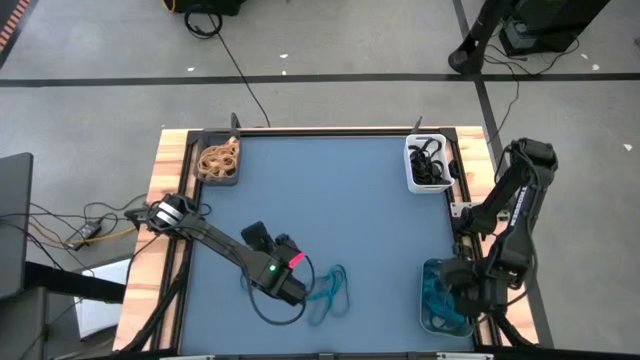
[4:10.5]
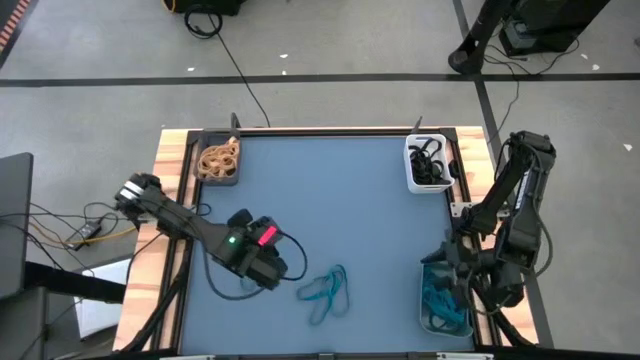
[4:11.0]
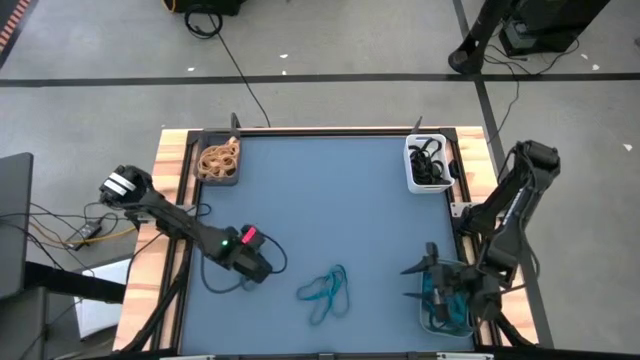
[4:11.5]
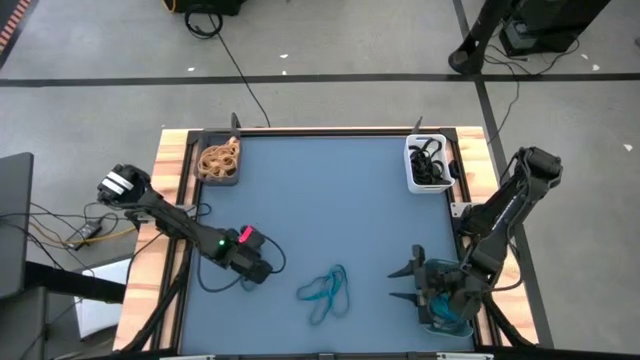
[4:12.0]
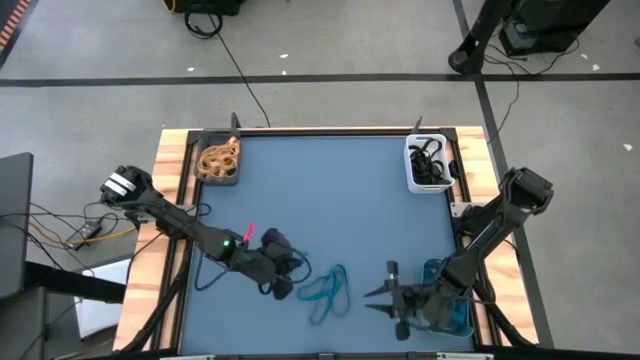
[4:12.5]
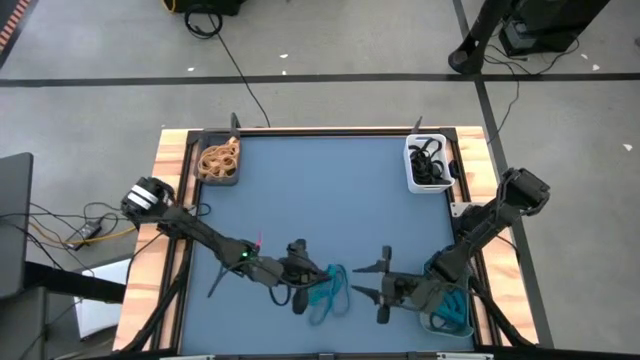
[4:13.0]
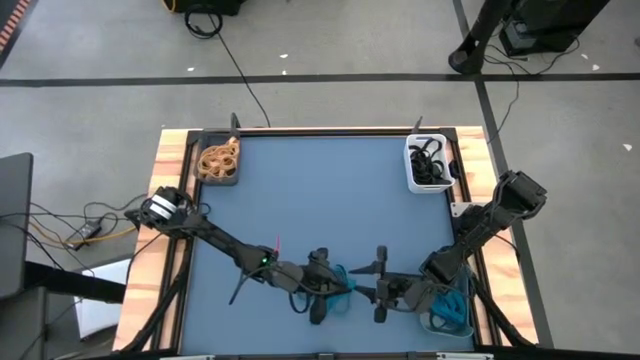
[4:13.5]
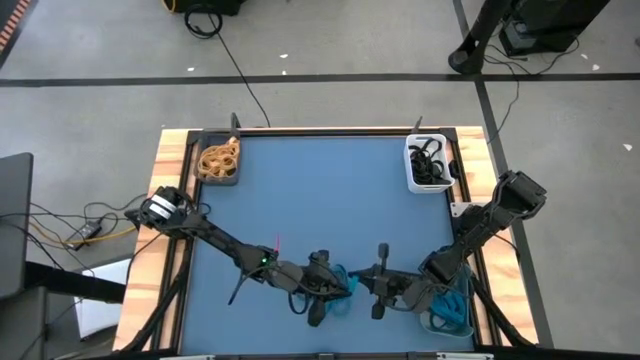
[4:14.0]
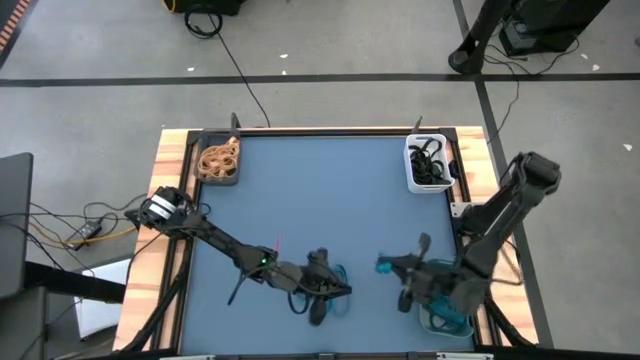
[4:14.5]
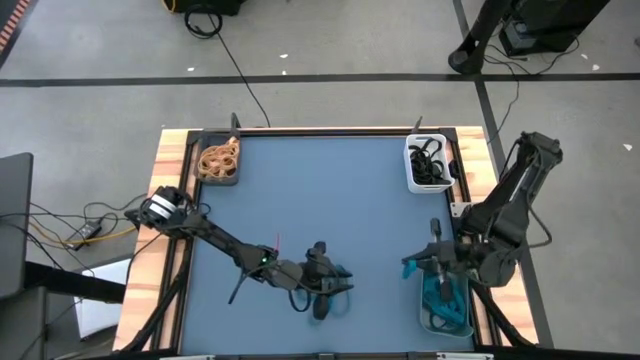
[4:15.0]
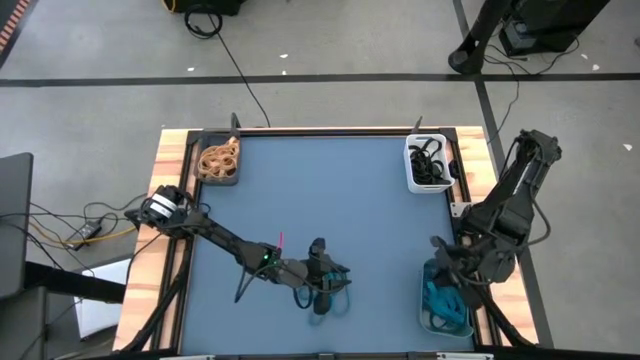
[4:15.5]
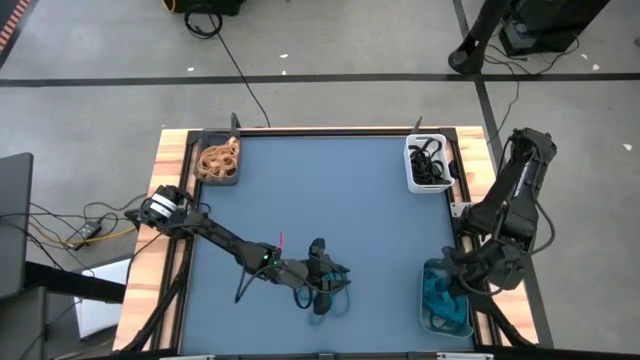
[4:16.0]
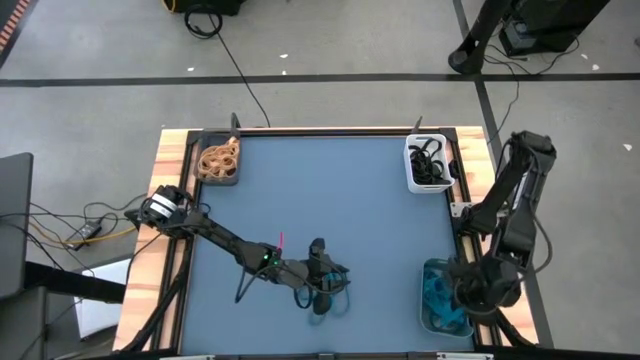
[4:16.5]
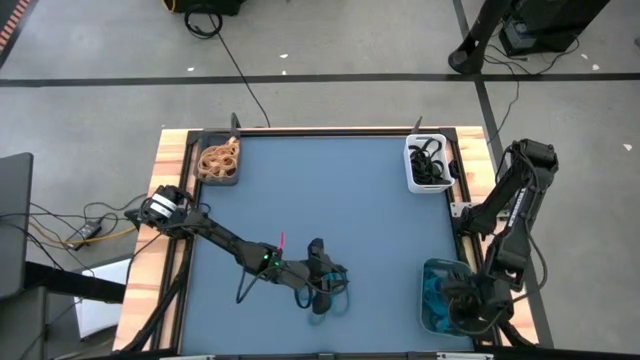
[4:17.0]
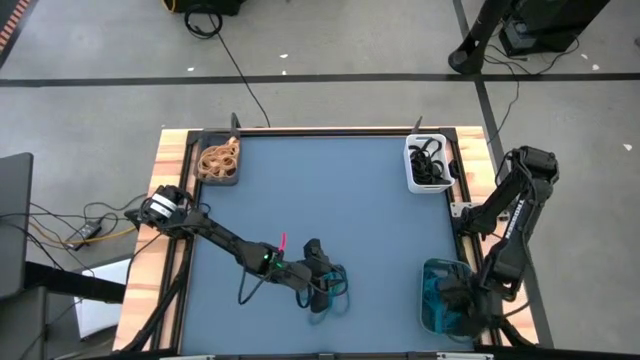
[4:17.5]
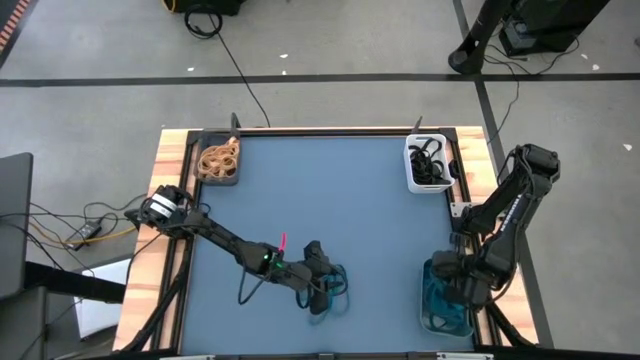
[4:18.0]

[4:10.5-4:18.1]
Task: Sort rubber bands into baskets
Put the blue rubber band into the blue bin

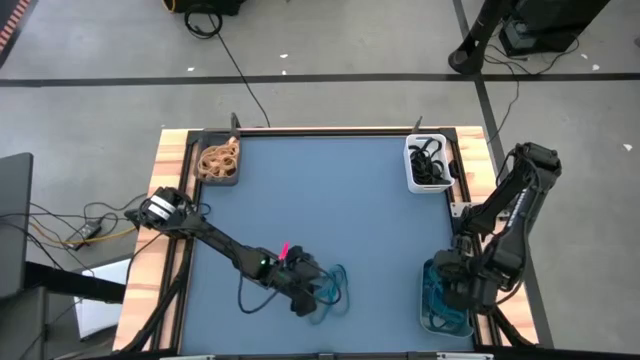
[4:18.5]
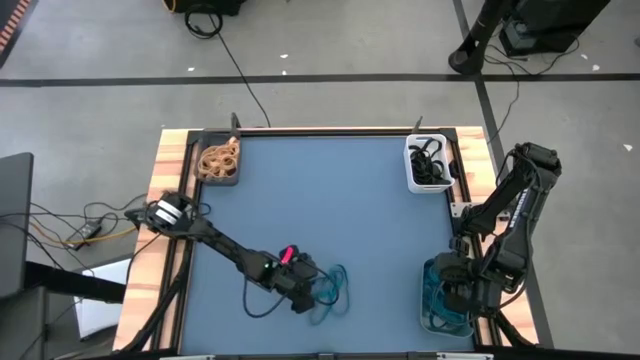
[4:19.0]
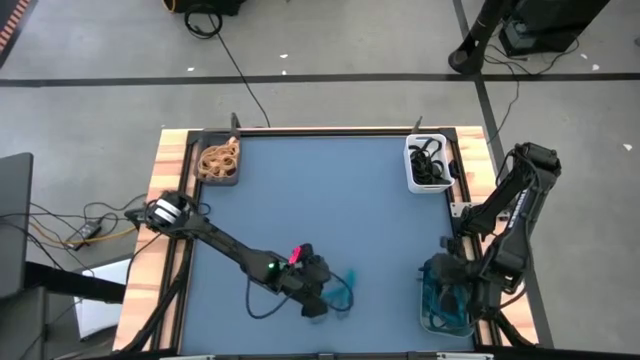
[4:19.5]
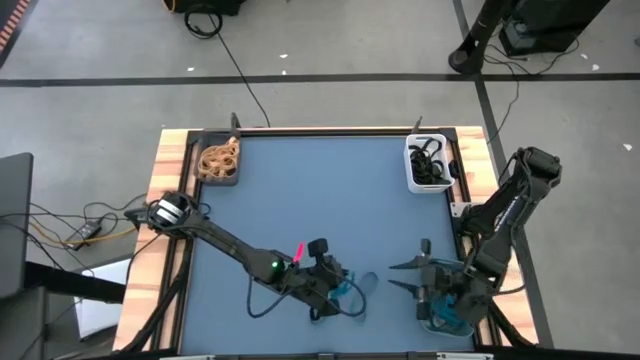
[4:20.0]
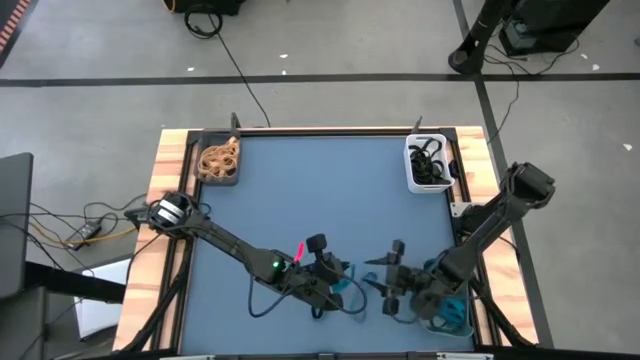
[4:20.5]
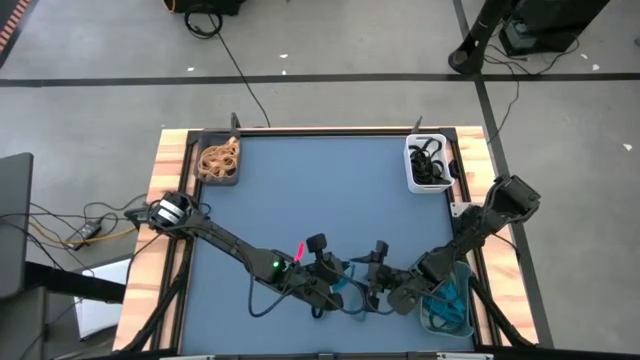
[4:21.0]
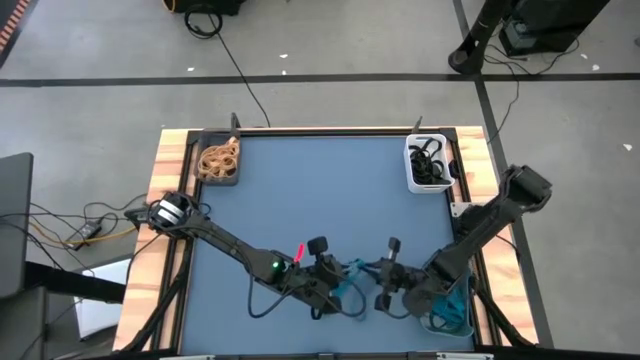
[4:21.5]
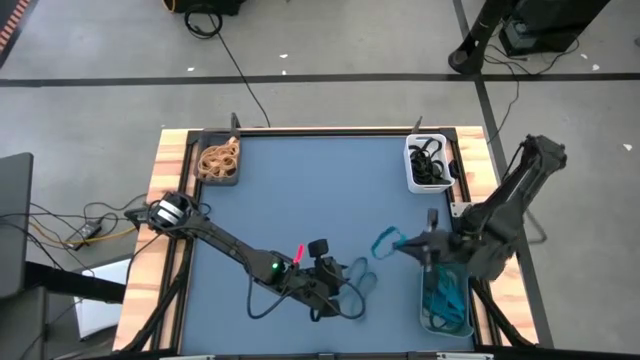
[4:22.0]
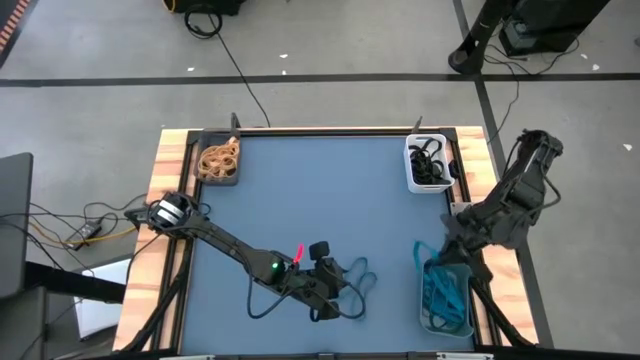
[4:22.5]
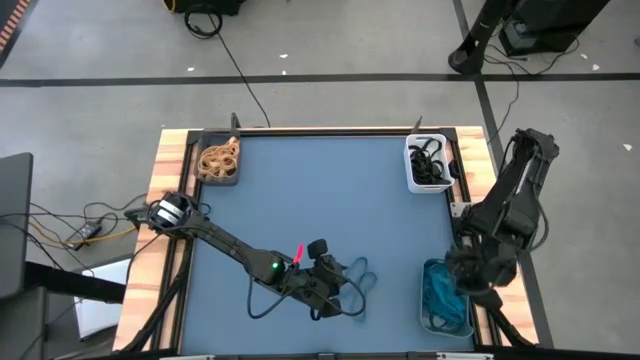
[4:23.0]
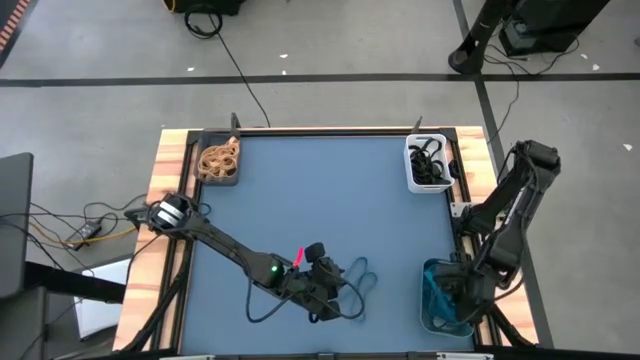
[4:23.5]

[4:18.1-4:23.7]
Put the blue rubber band into the blue bin

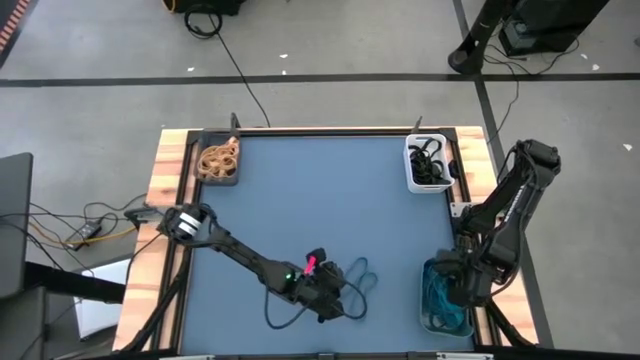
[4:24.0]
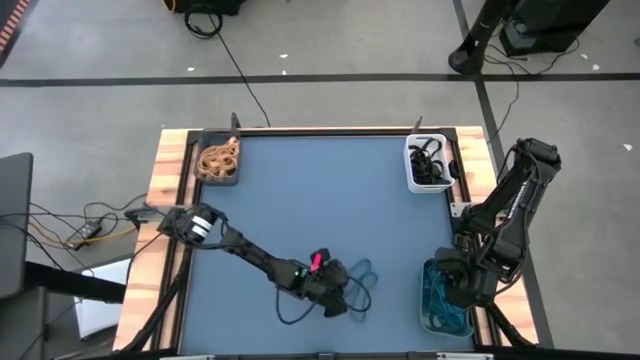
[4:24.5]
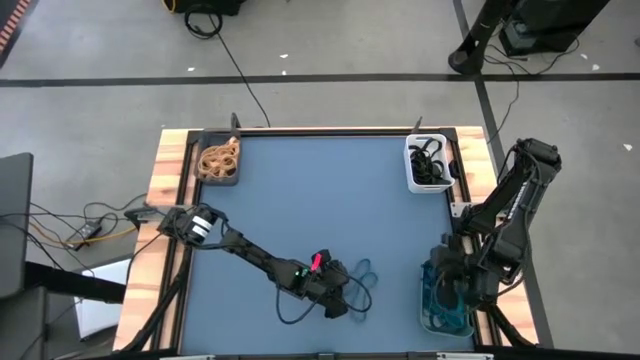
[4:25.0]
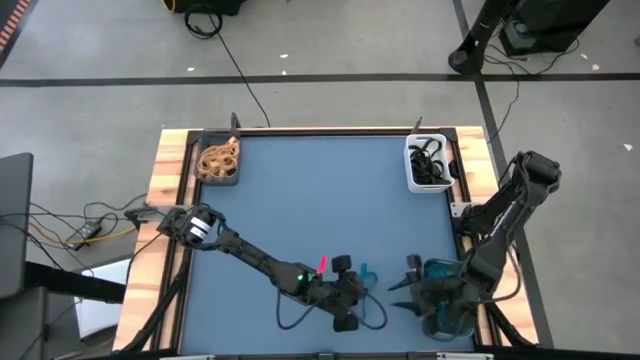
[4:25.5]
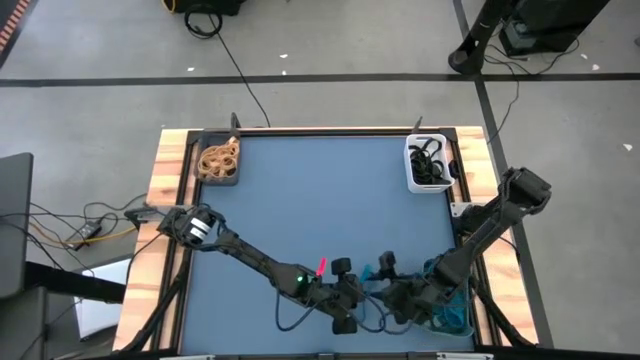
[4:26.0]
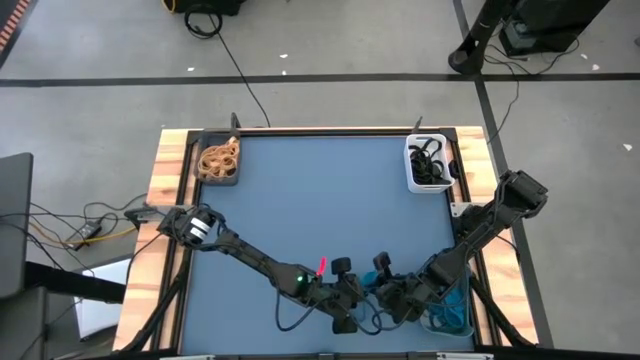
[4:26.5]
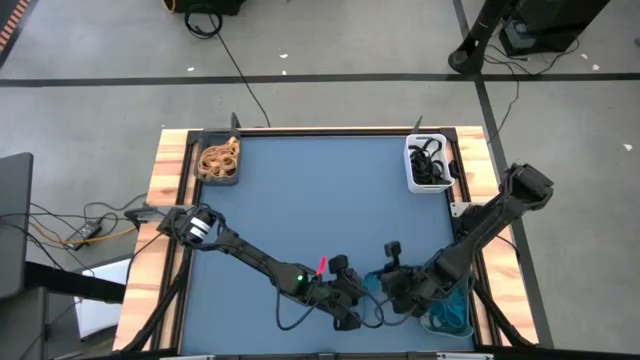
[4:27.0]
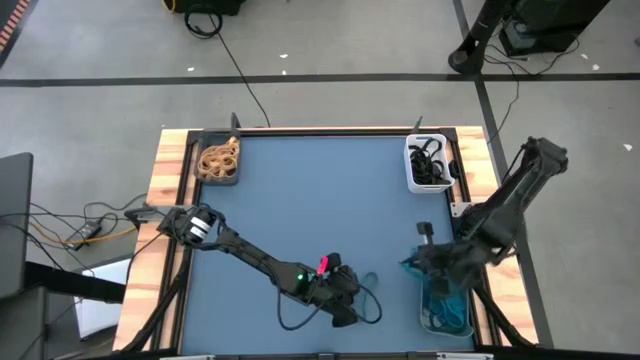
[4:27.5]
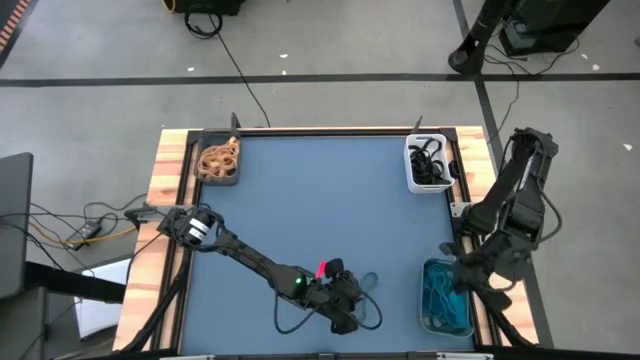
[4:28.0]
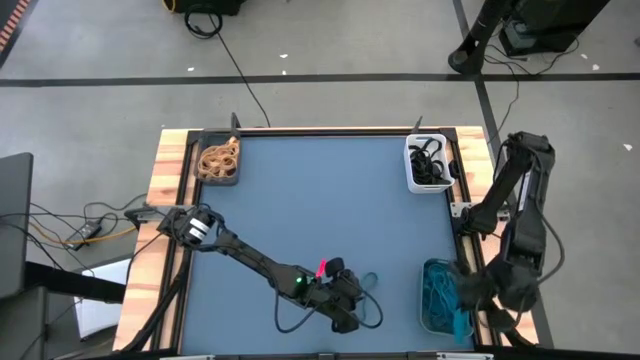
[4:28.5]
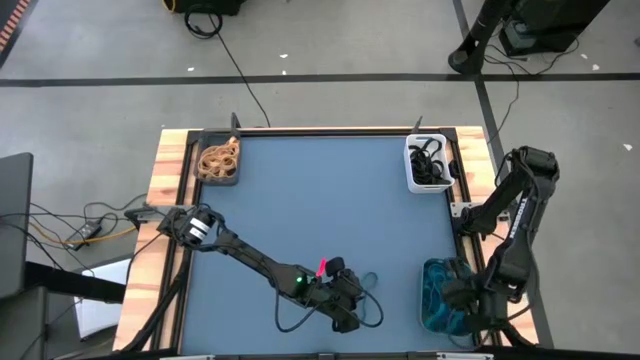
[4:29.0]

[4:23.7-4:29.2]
Put the blue rubber band into the blue bin

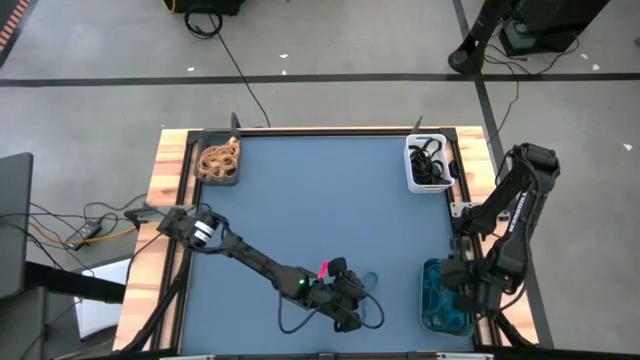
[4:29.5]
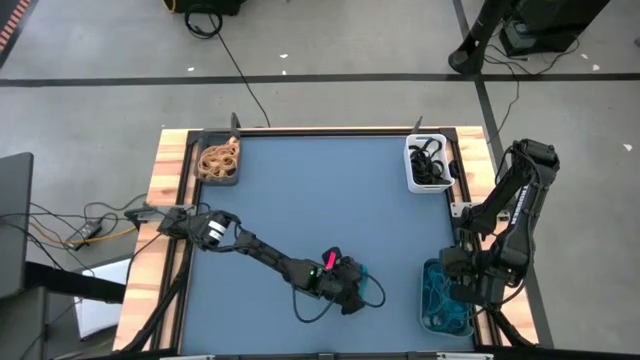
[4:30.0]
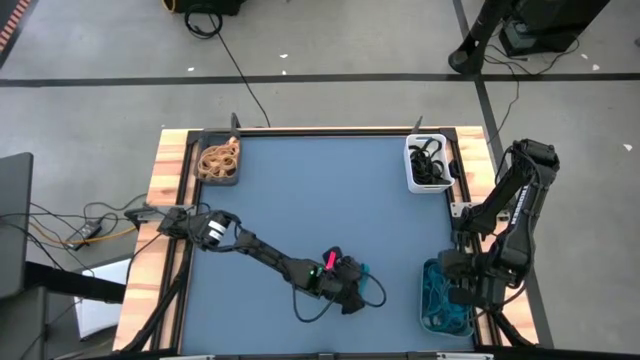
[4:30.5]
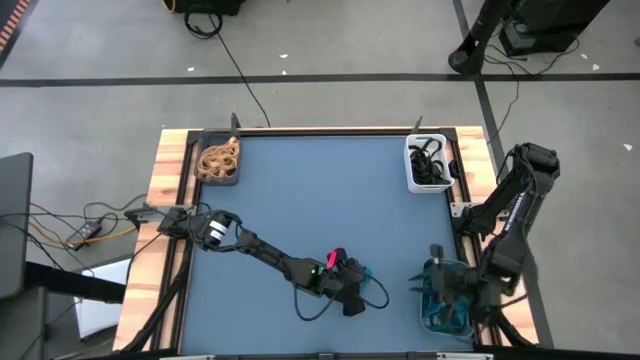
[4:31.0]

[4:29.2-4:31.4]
Put the blue rubber band into the blue bin
